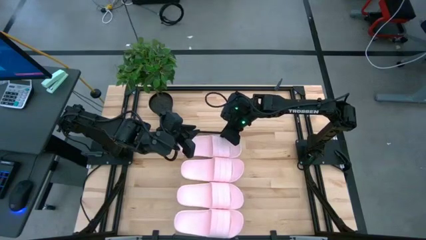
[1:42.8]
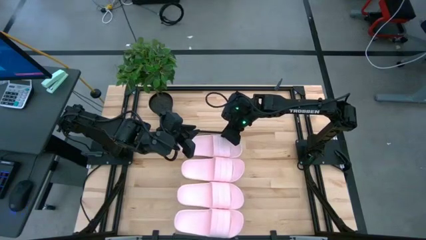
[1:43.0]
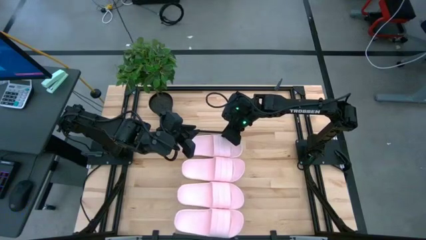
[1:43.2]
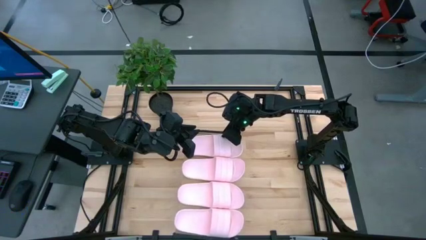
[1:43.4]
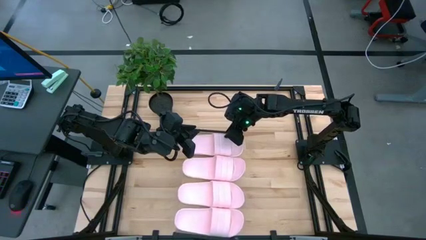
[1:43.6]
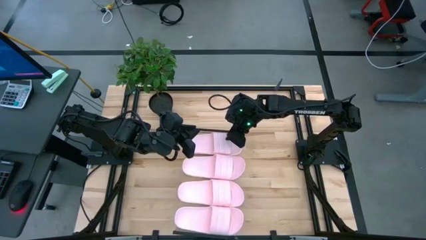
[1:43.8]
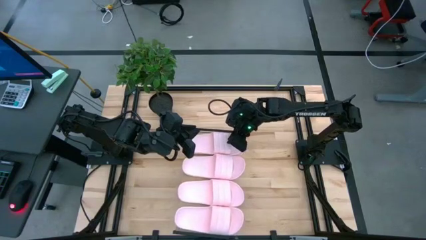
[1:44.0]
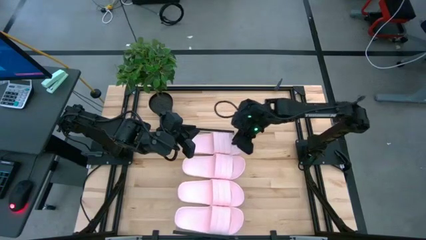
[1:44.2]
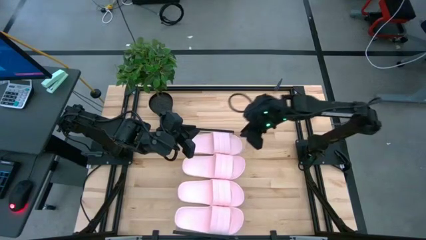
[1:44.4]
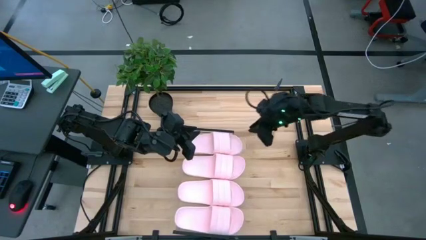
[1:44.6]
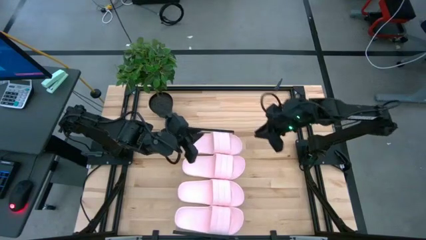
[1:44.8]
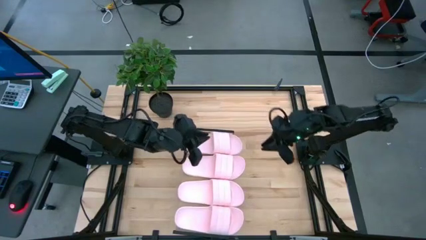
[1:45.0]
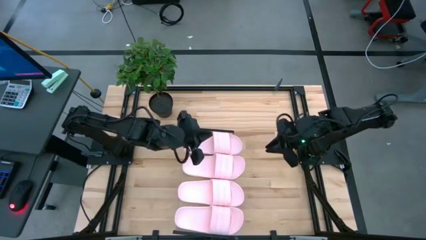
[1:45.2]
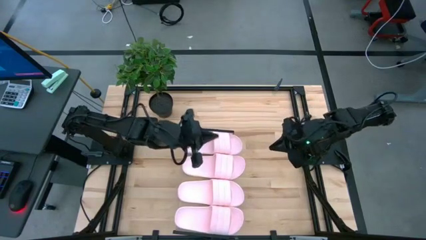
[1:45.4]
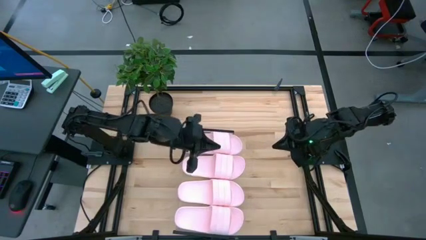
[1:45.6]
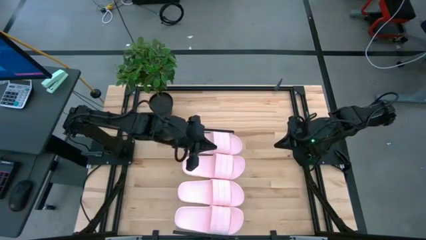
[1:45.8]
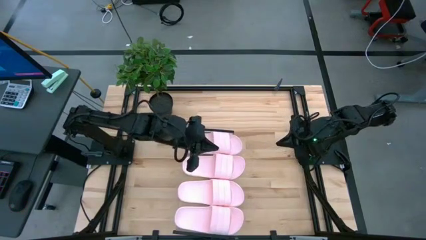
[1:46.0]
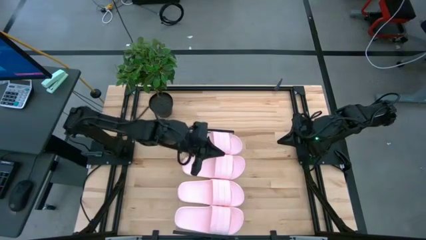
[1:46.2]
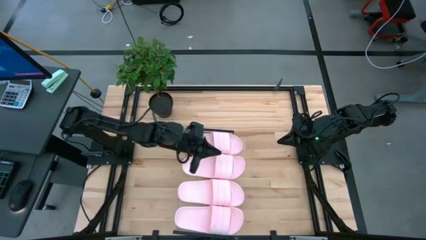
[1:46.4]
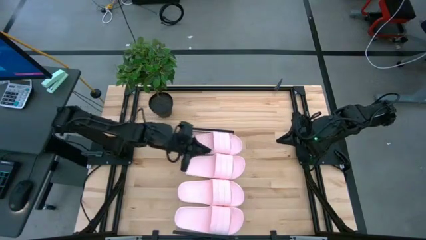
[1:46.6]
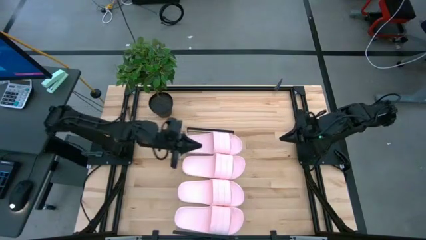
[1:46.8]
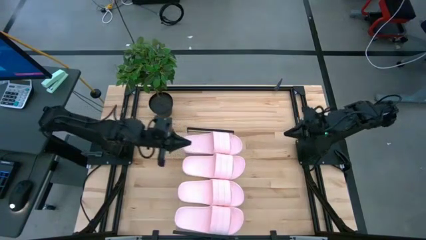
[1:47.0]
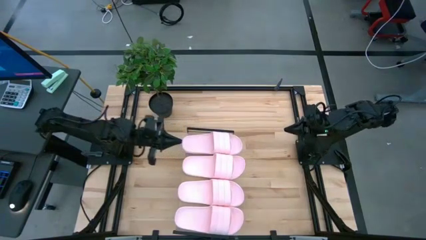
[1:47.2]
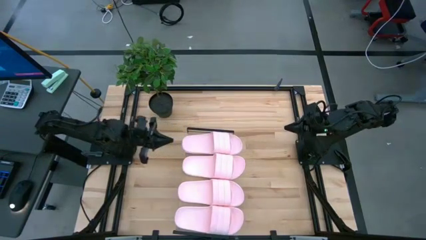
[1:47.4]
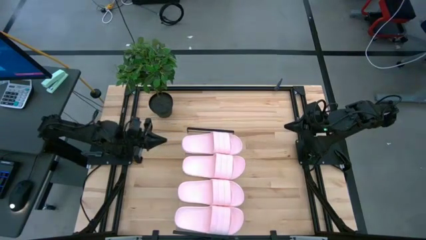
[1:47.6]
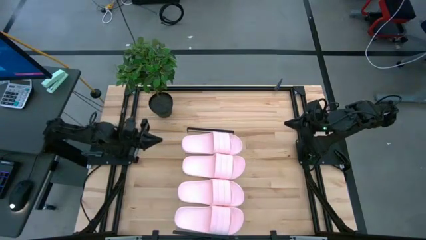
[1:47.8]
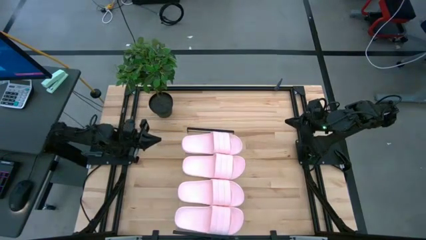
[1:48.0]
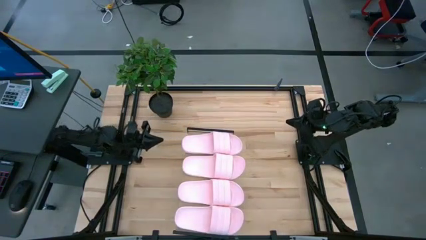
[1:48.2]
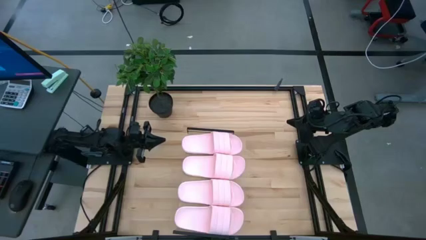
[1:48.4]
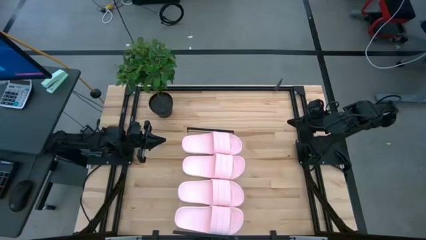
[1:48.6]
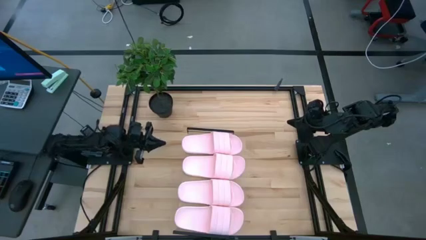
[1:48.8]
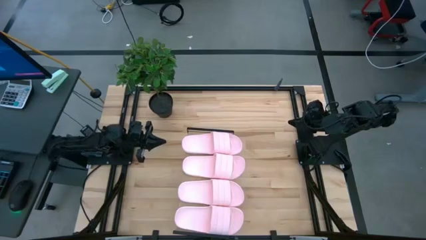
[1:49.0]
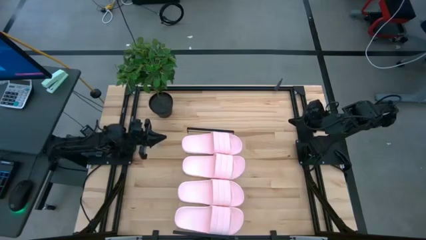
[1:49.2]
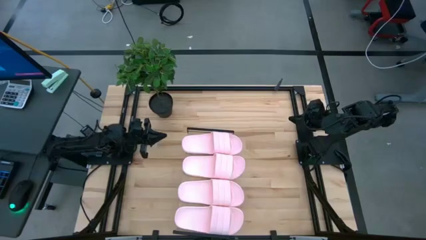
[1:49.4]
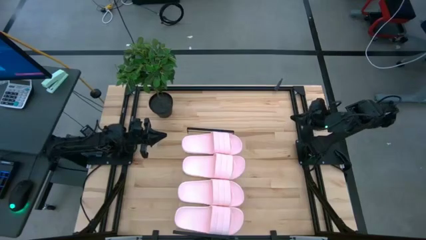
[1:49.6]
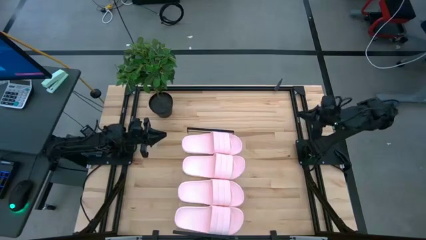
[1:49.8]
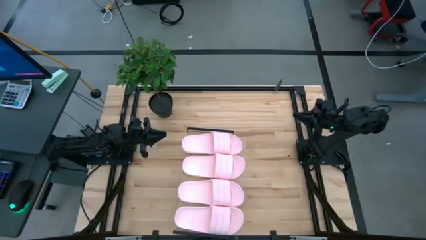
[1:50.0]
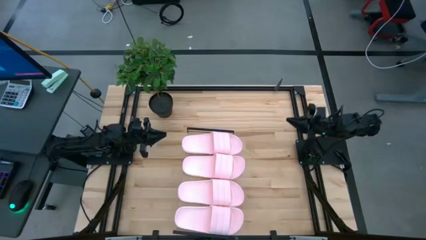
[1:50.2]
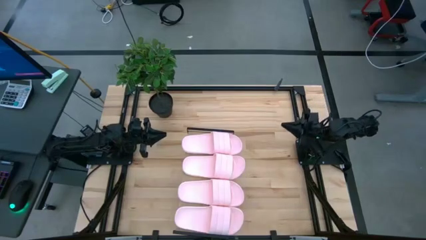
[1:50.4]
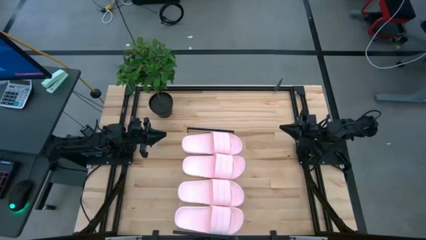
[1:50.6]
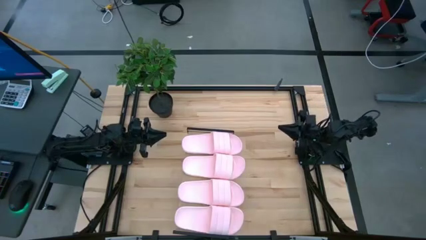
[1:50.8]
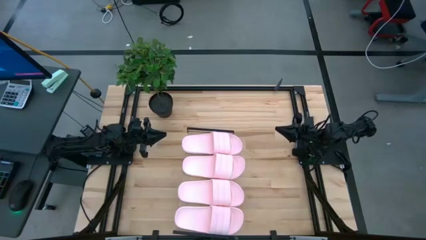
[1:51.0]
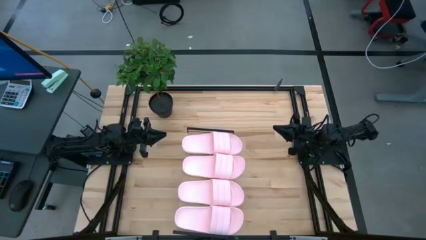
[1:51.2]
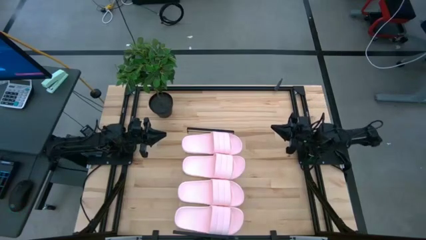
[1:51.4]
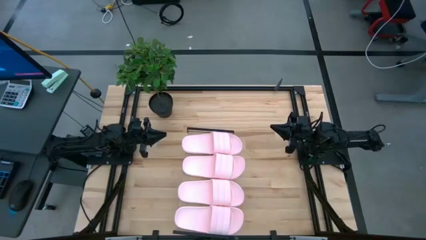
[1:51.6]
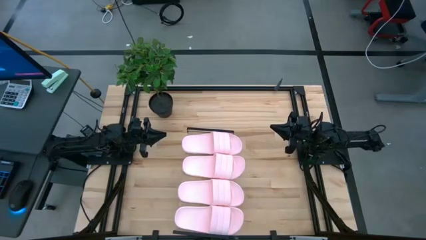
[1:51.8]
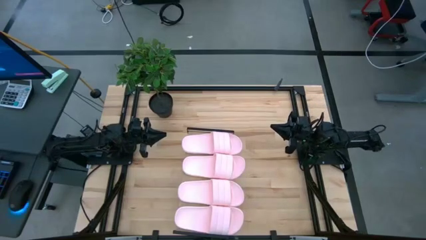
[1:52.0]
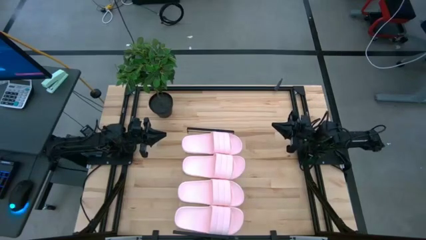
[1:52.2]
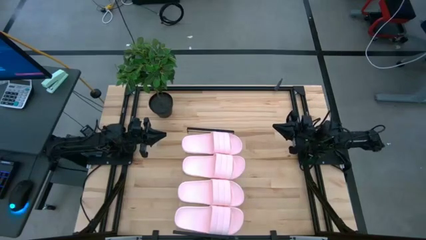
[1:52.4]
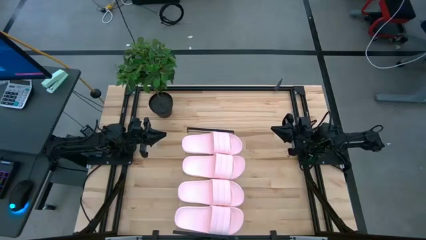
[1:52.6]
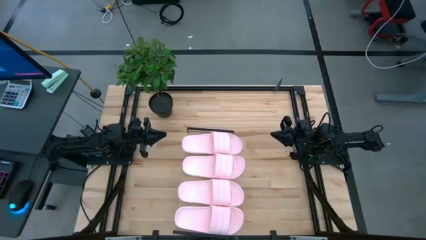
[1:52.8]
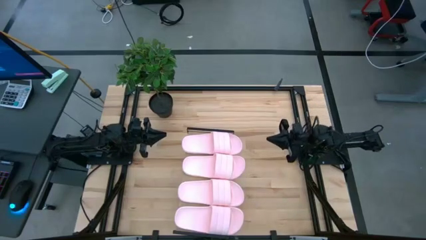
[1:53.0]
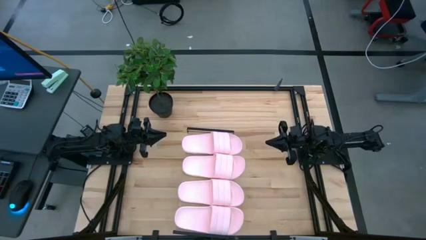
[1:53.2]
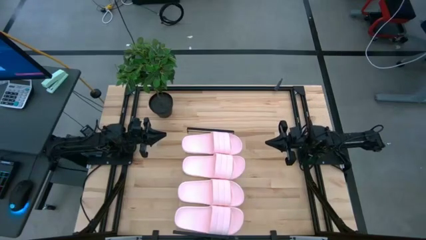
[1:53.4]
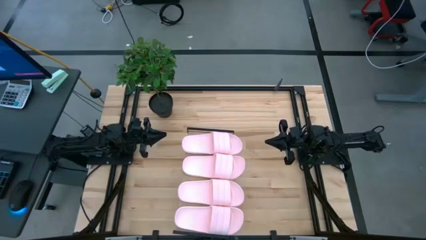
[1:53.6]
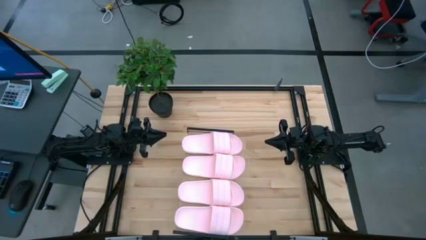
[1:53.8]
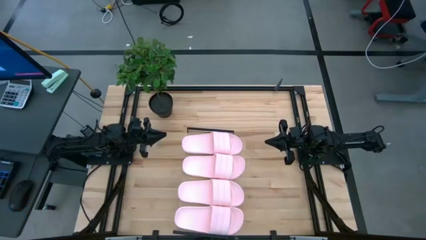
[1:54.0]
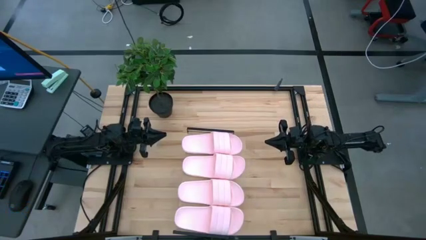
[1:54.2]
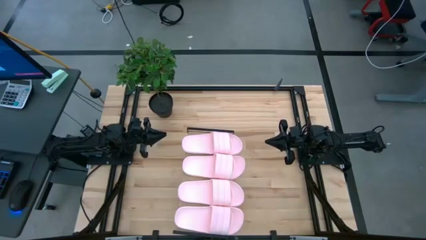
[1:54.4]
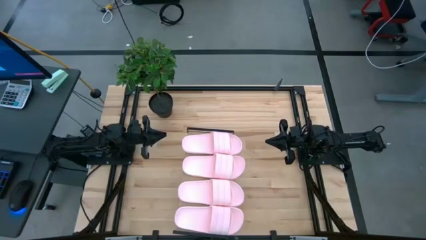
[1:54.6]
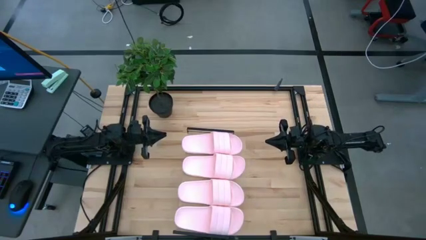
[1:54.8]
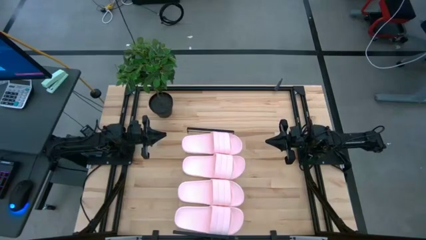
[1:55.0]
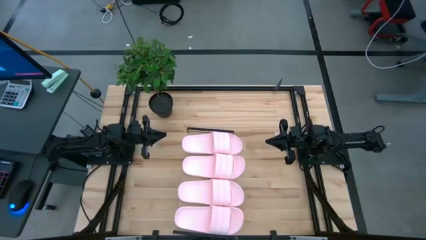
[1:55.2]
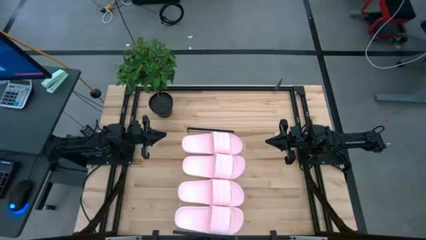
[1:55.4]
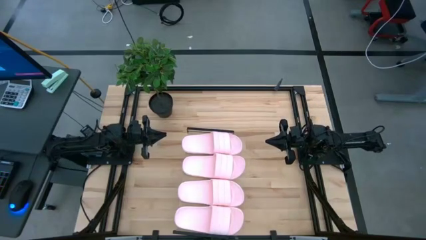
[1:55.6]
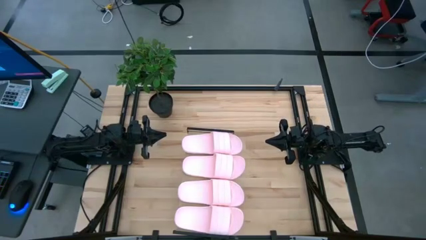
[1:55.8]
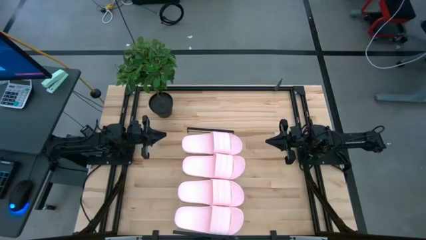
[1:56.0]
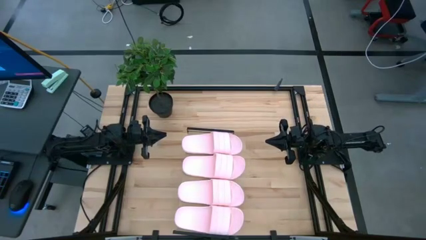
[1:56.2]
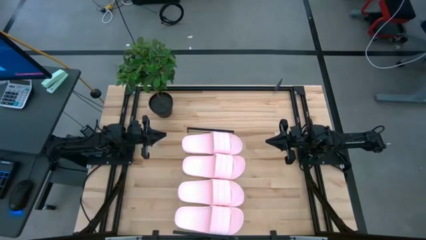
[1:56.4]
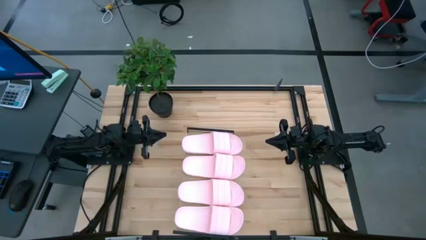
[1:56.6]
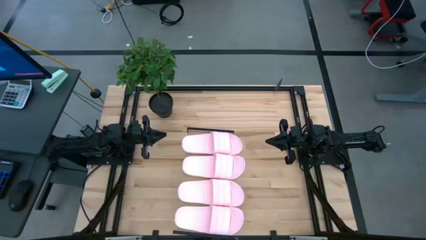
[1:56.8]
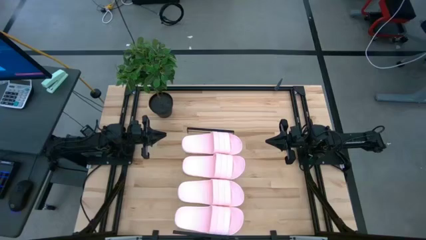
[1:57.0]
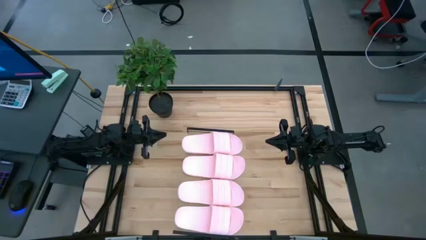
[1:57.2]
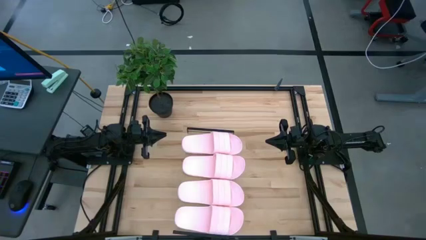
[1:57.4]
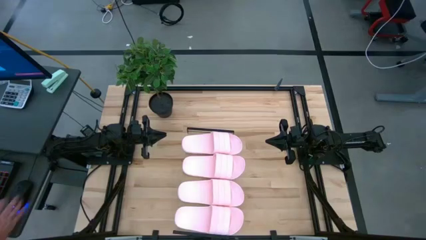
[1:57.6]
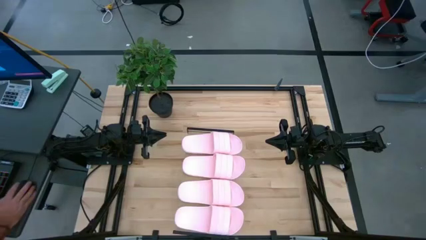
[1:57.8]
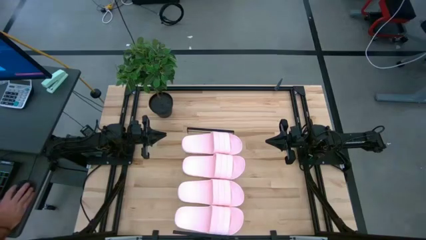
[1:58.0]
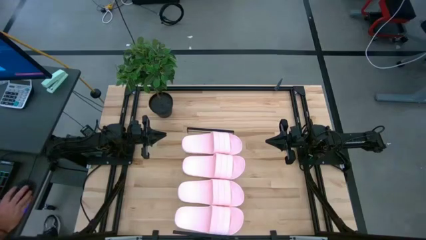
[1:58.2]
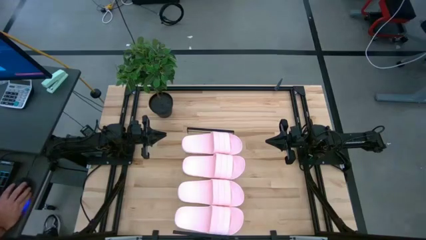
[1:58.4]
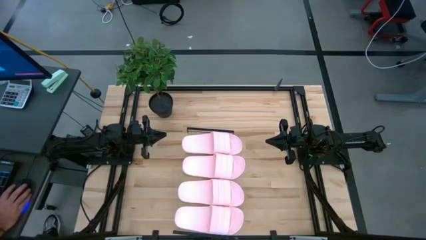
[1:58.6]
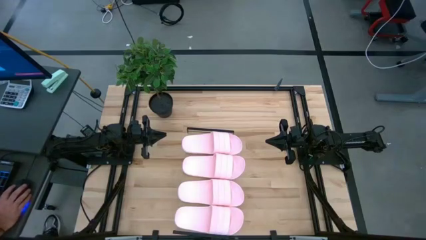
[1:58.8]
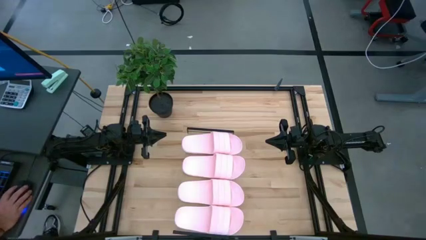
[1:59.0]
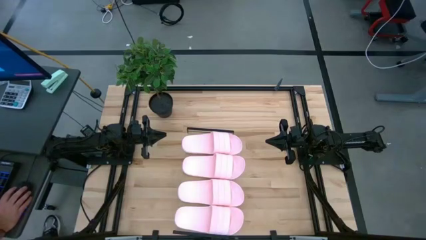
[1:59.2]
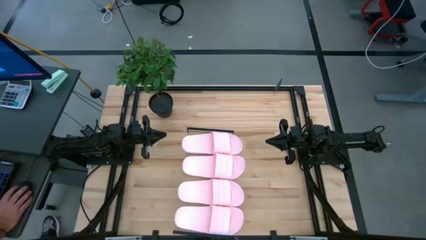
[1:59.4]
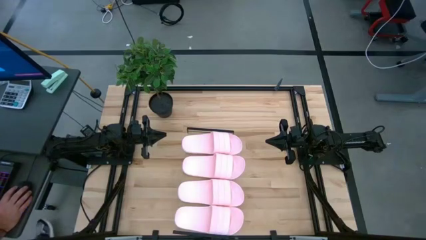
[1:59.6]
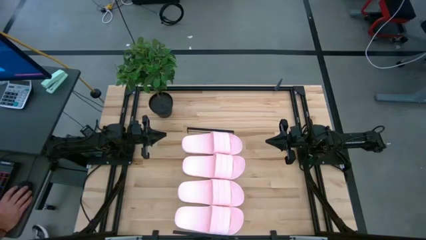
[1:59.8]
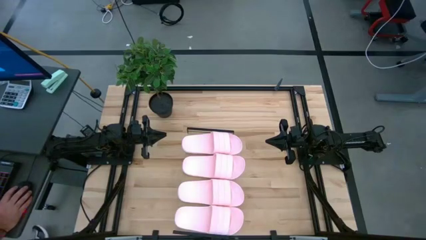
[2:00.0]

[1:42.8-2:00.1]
Task: Pick and place slides into the shelf
Return to Home Position
